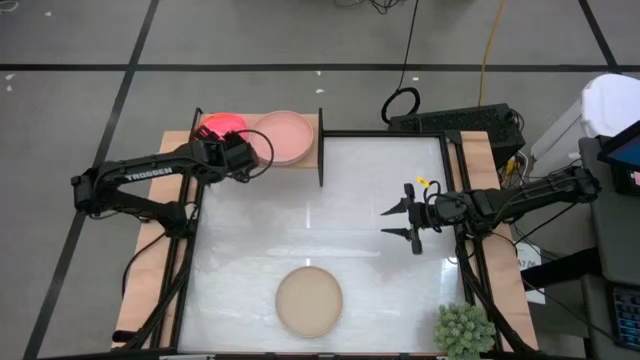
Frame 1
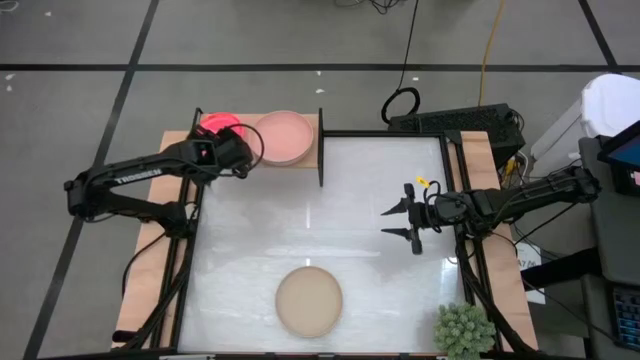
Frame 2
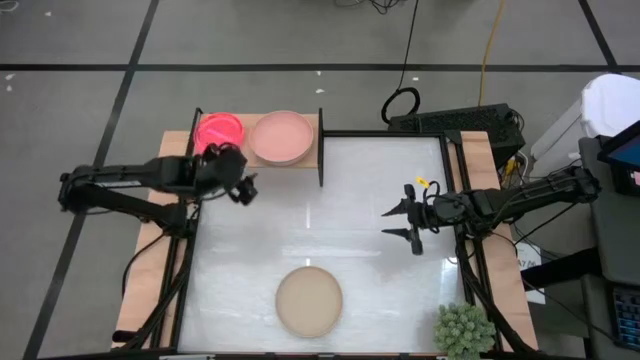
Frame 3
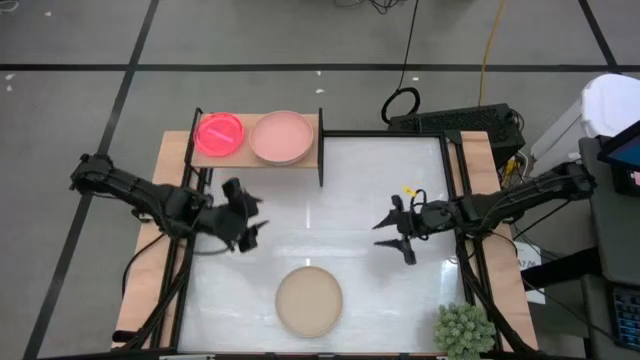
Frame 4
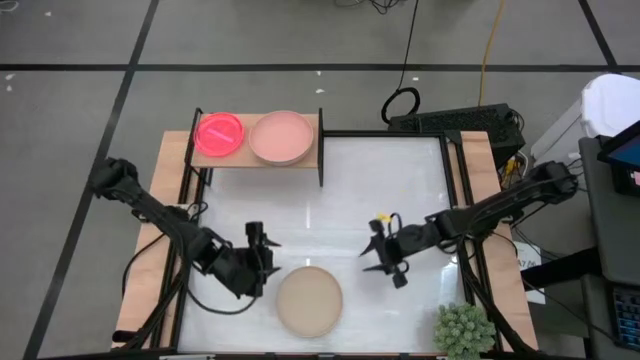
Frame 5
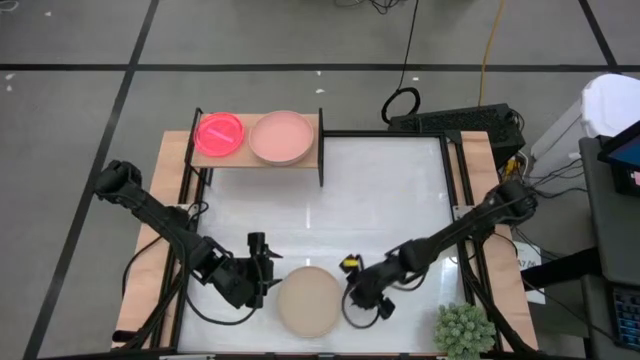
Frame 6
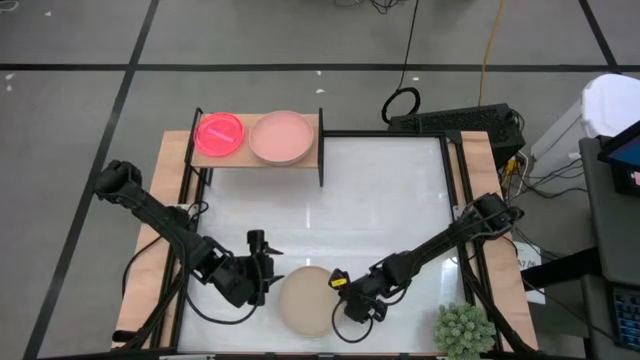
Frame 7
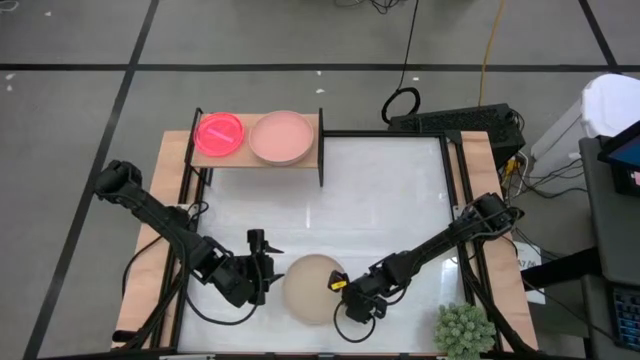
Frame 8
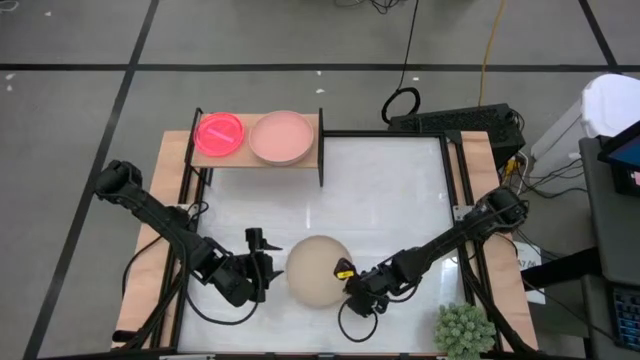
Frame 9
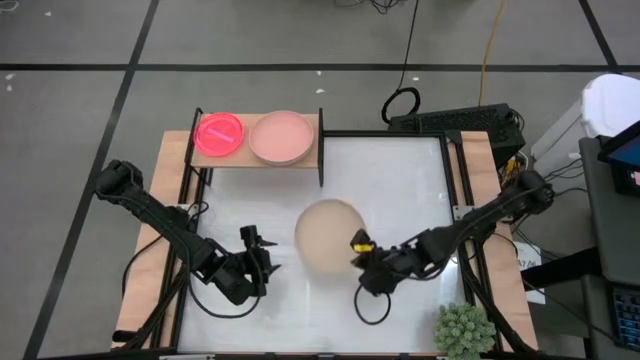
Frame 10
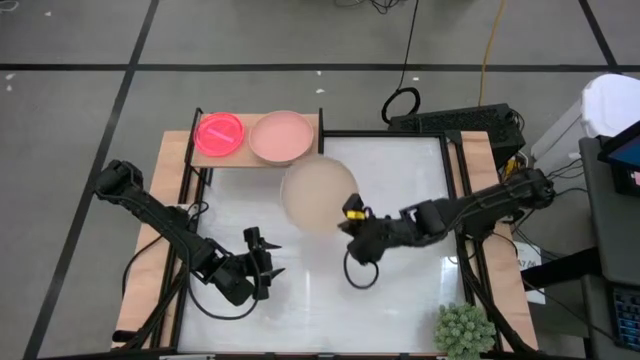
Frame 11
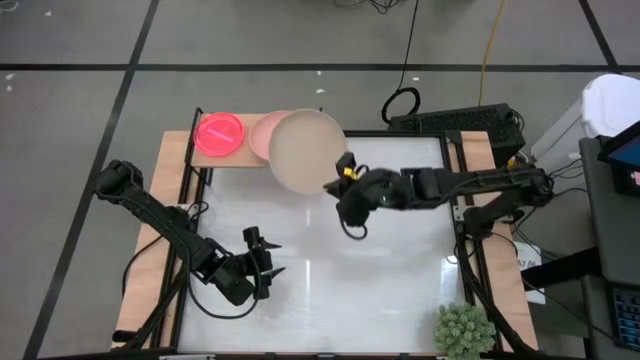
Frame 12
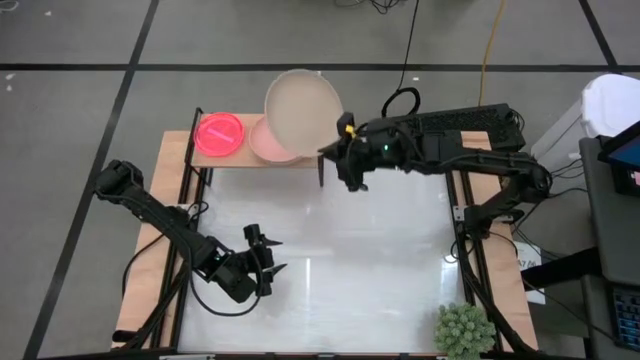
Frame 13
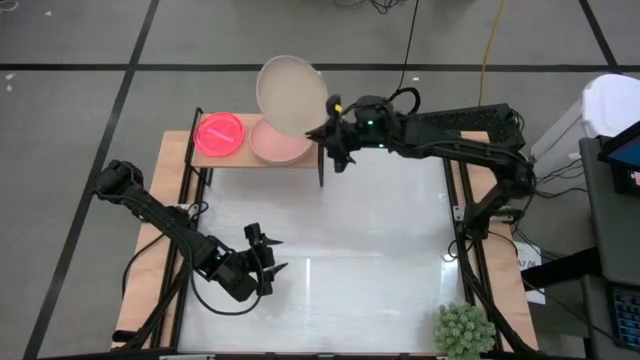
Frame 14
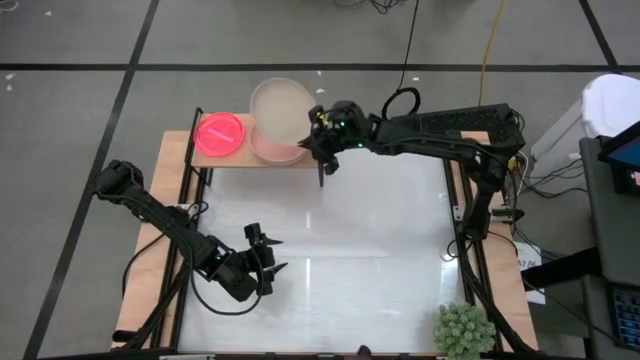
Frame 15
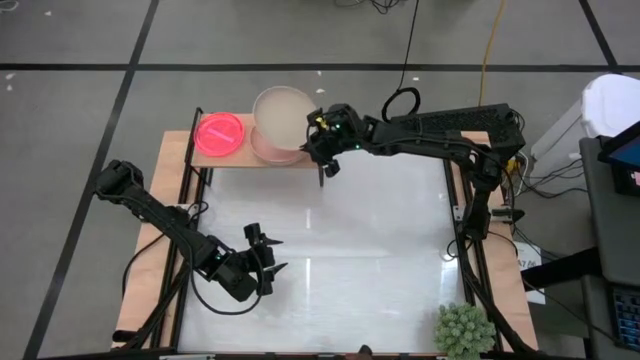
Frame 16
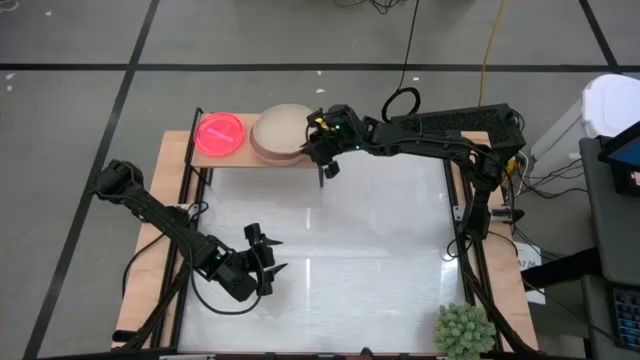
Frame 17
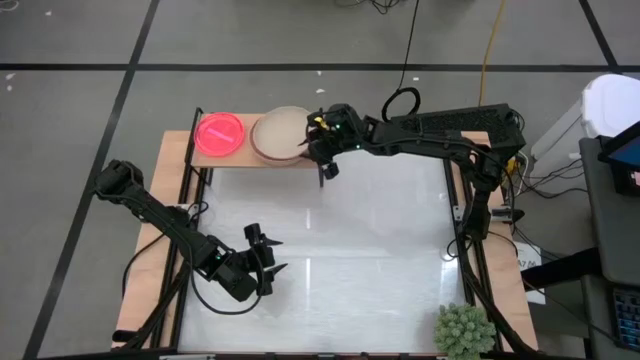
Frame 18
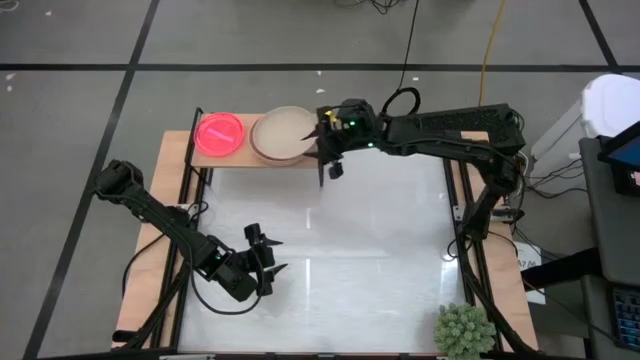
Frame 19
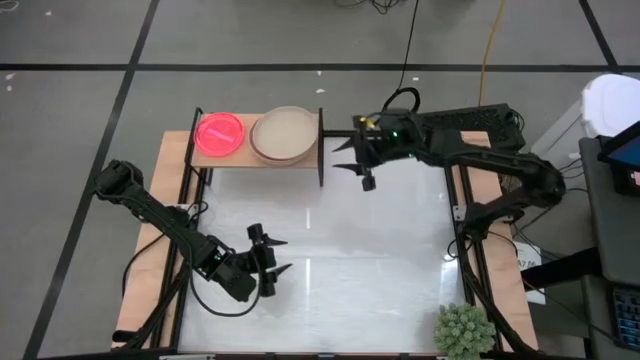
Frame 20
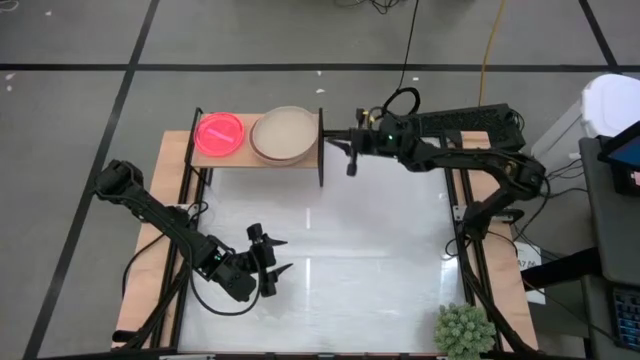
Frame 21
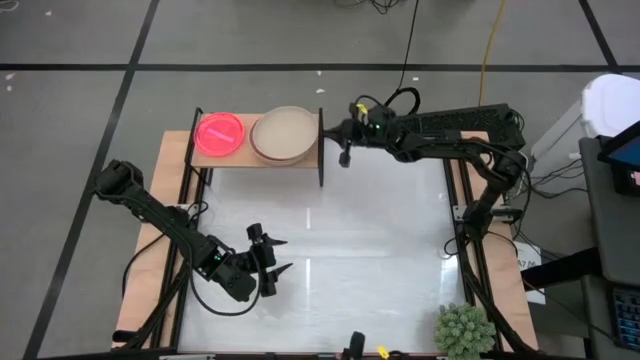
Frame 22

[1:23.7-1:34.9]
Task: Place and stack plates onto a shelf
Stack the big light brown plate on top of the big light orange plates on the shelf

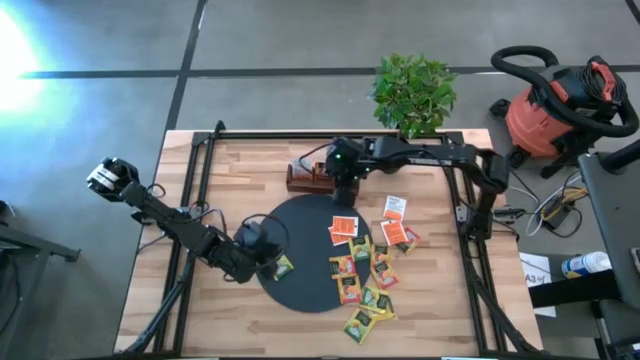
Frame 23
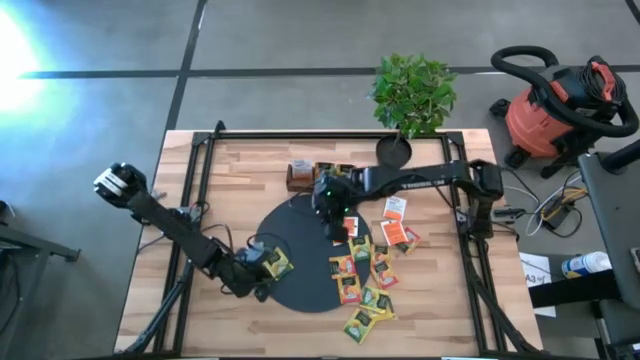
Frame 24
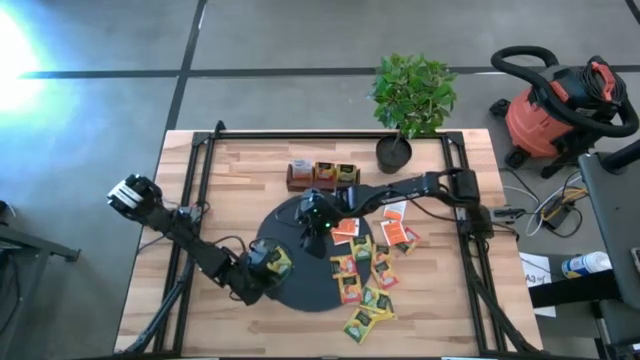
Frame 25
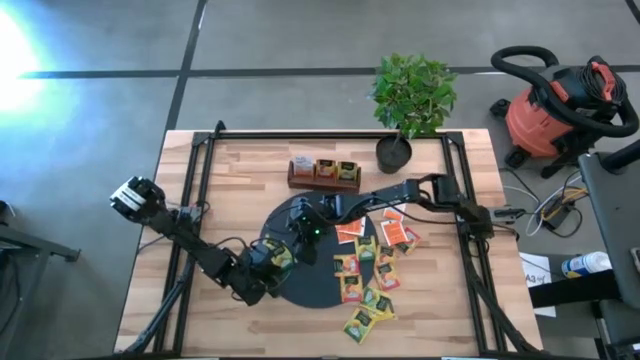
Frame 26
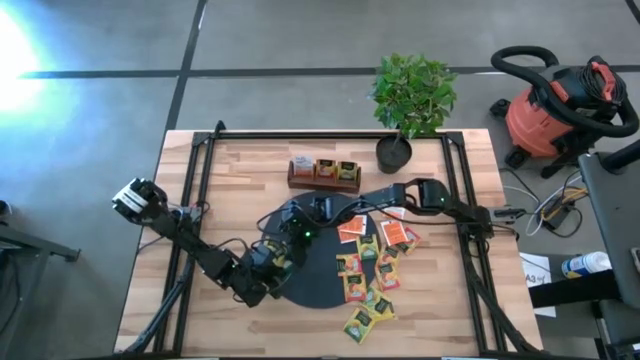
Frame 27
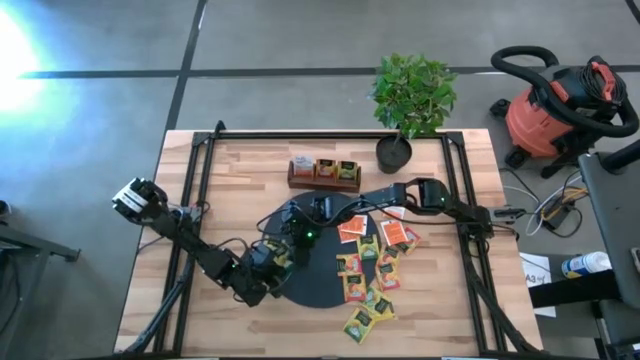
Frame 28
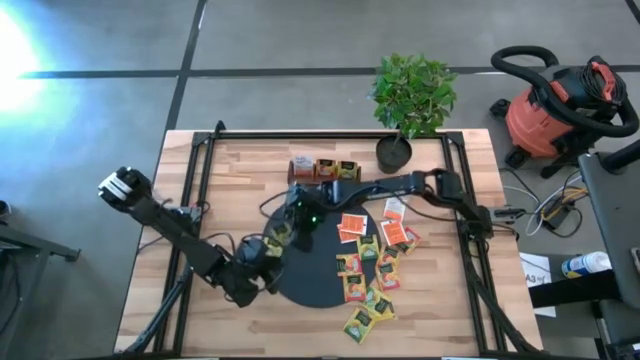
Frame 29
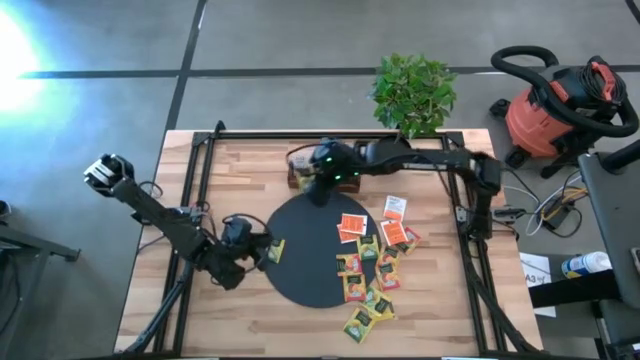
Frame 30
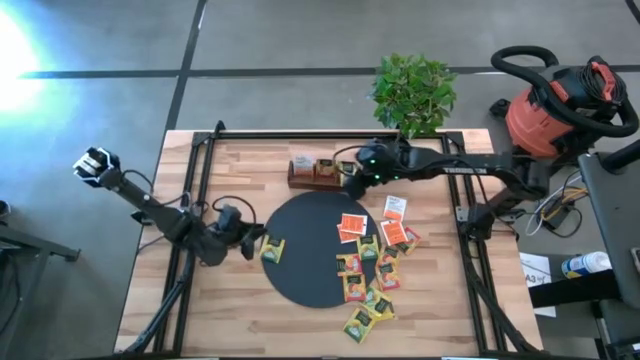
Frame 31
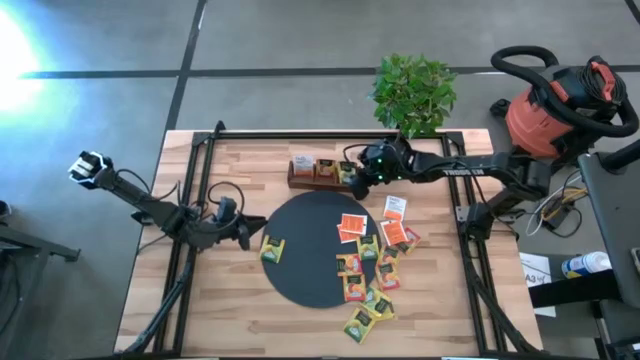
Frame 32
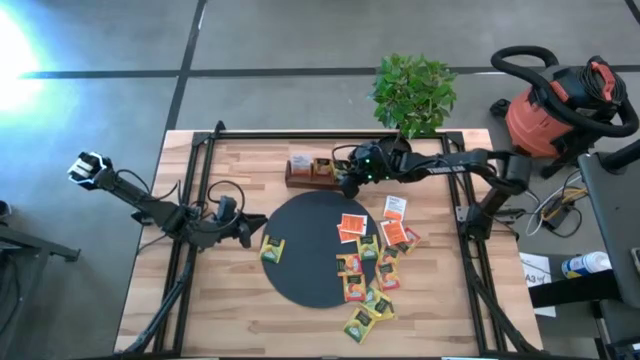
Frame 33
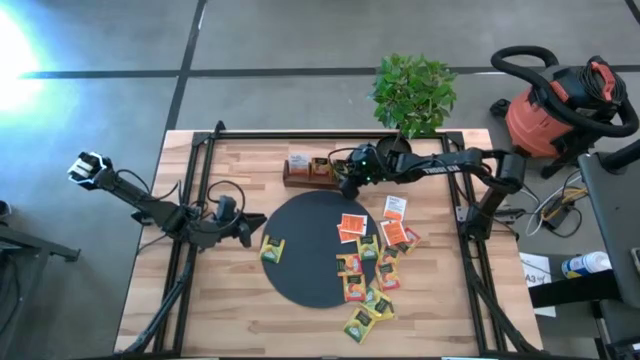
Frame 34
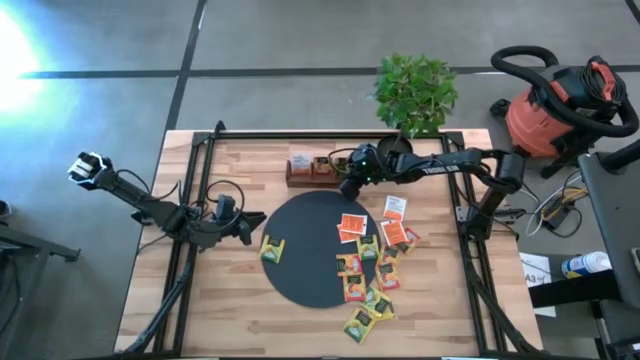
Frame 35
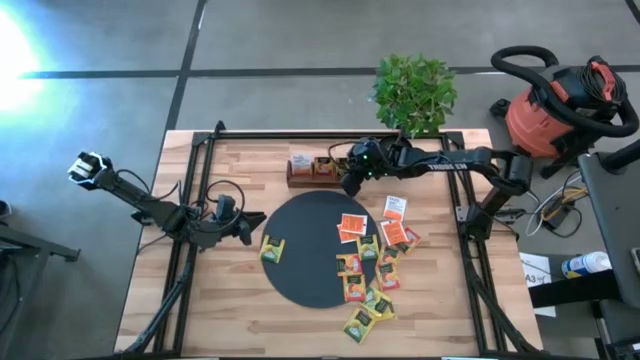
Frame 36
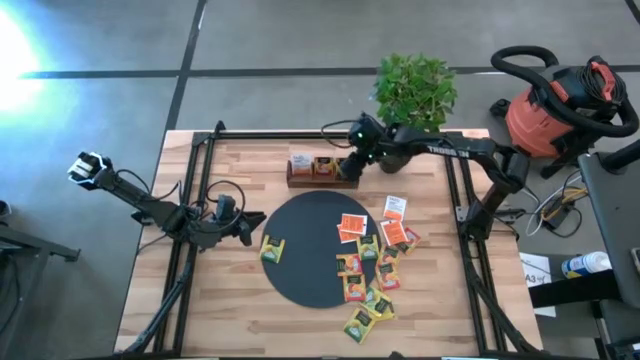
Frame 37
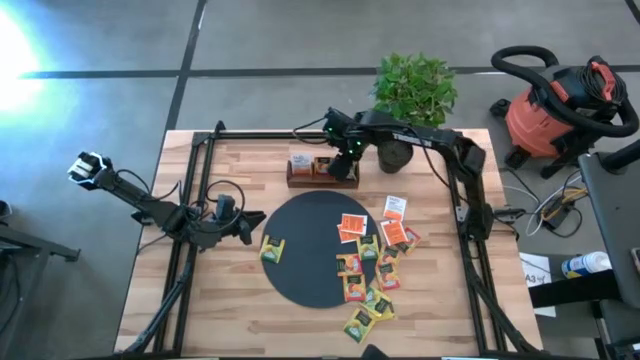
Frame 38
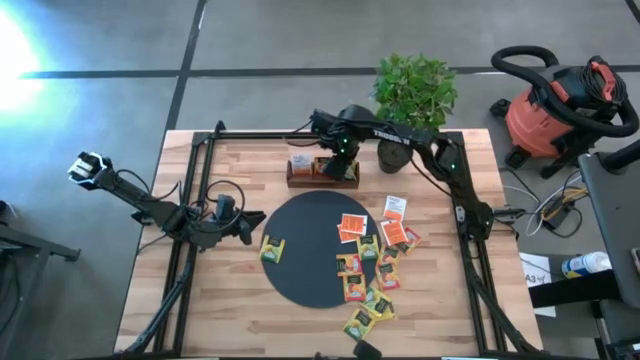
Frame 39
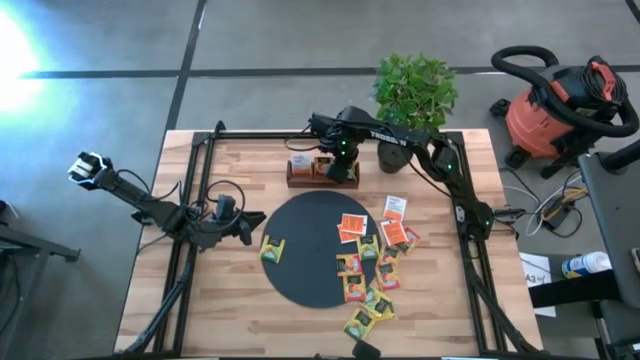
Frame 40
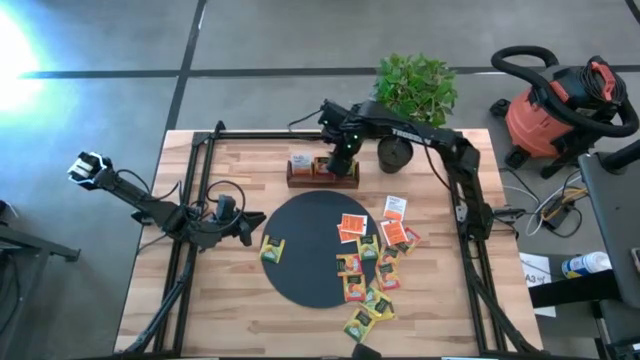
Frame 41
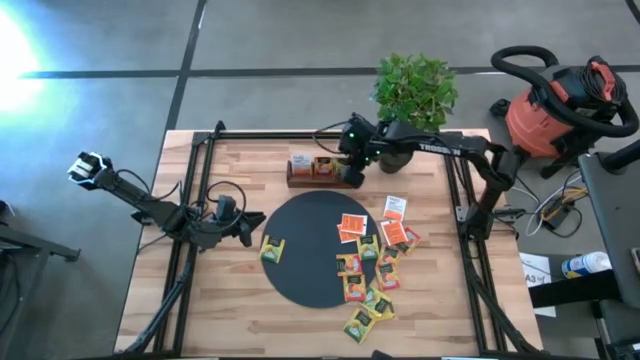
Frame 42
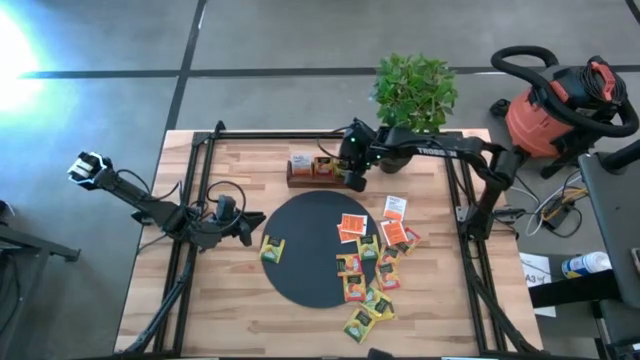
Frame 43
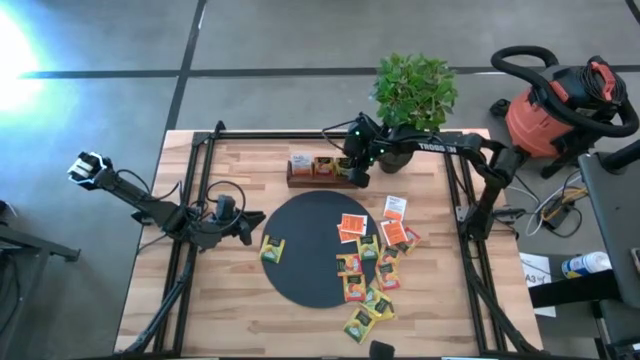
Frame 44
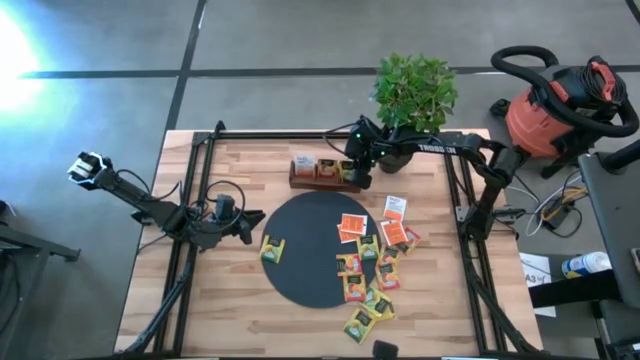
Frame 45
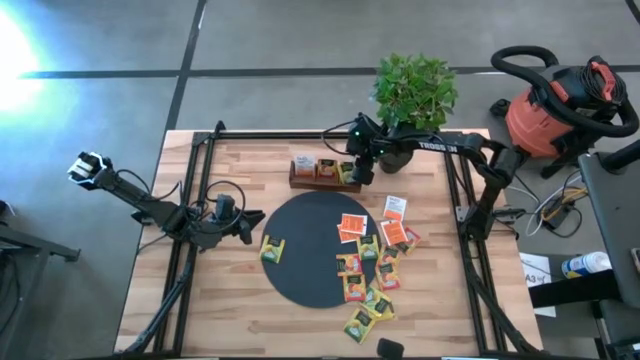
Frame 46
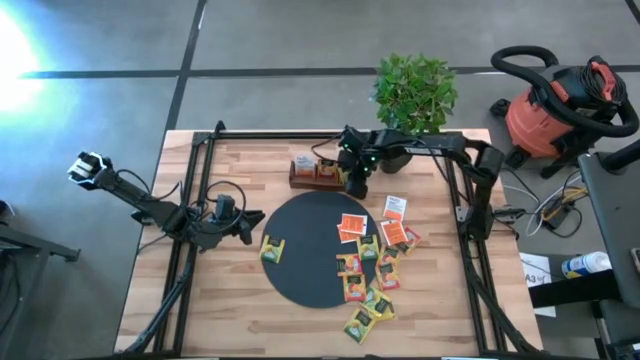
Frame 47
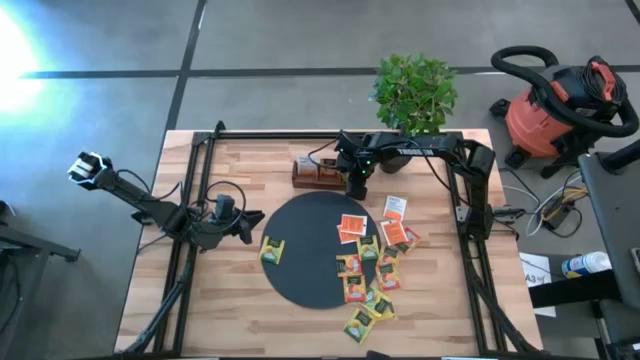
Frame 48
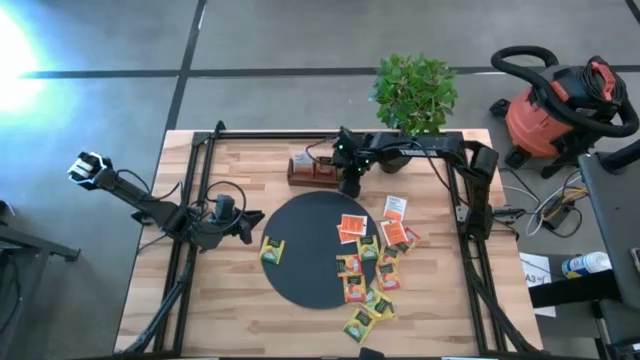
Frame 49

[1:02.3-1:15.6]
Task: Pick & Place Tea
Put the yellow tea bag into the right section of the brown wooden organizer
